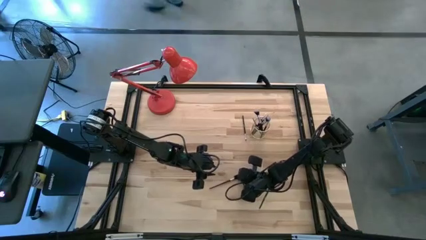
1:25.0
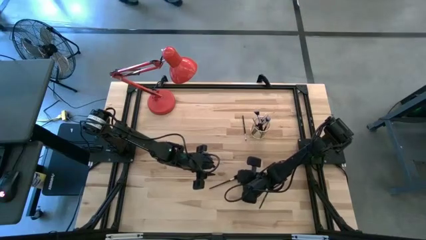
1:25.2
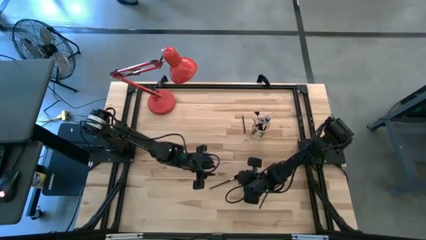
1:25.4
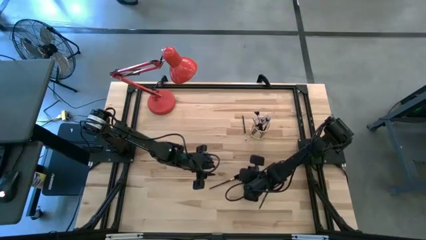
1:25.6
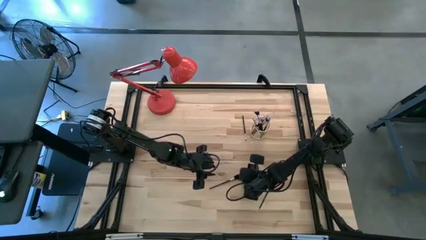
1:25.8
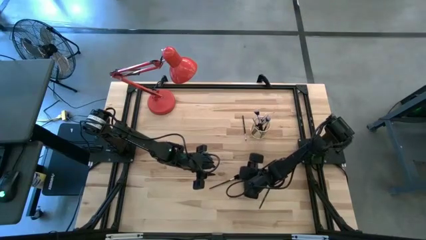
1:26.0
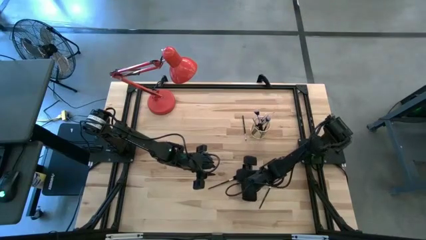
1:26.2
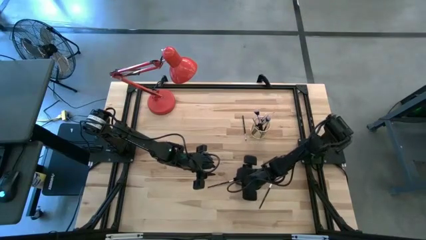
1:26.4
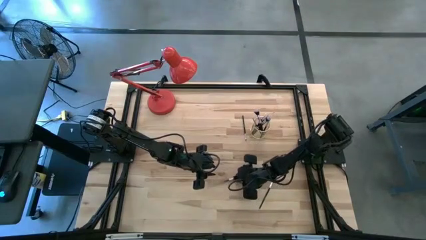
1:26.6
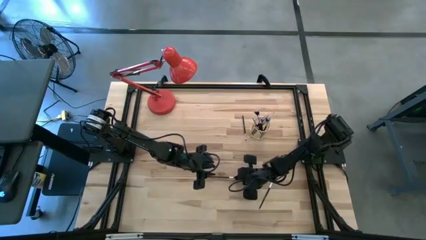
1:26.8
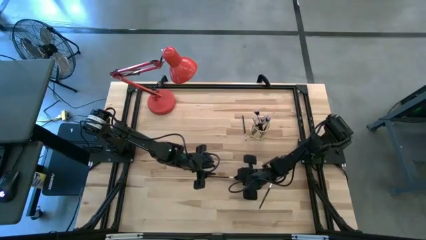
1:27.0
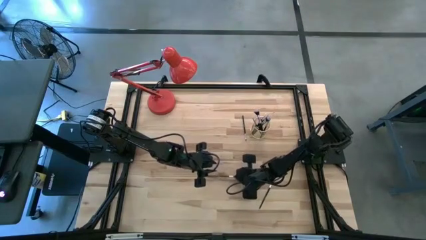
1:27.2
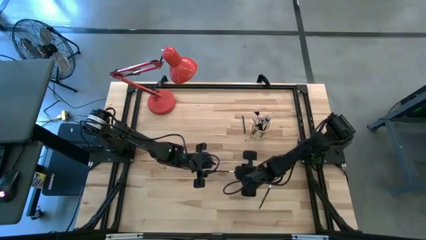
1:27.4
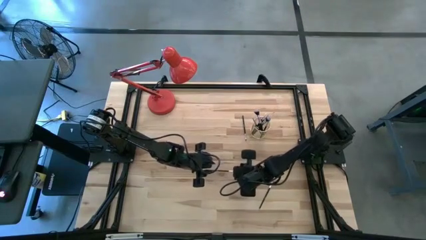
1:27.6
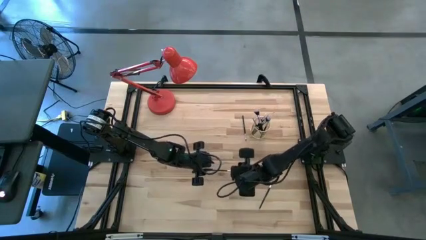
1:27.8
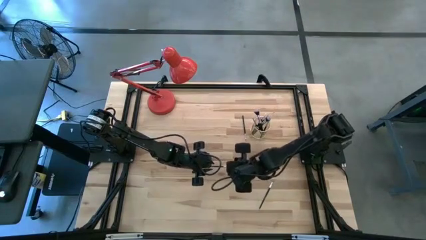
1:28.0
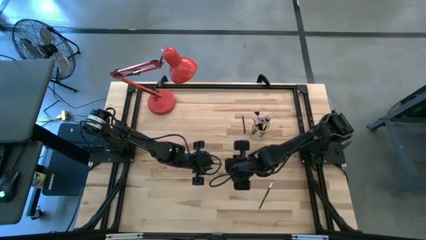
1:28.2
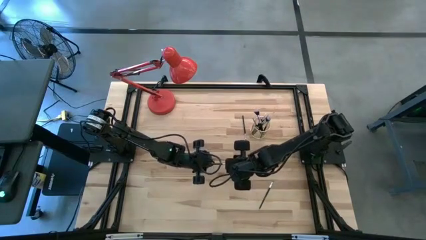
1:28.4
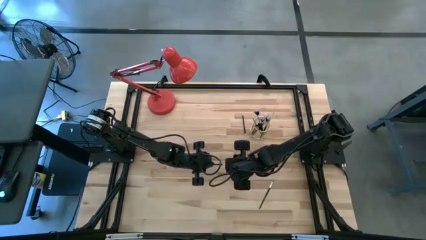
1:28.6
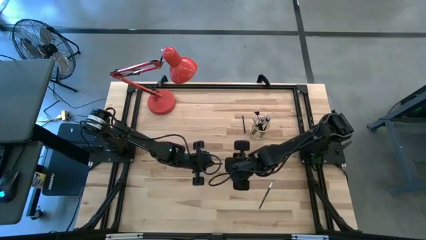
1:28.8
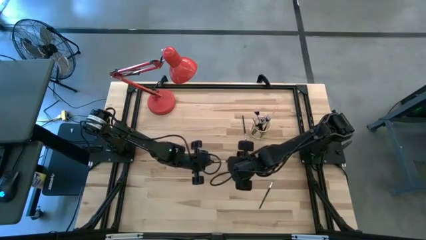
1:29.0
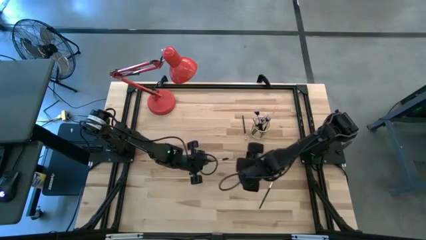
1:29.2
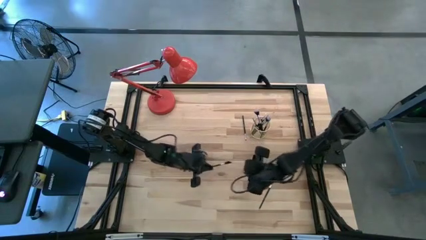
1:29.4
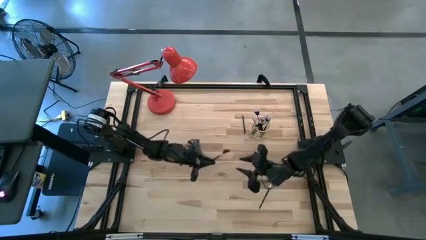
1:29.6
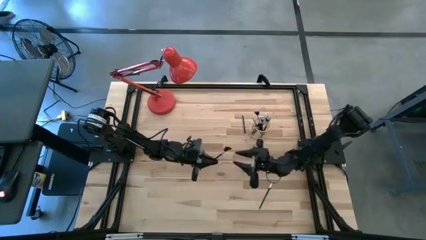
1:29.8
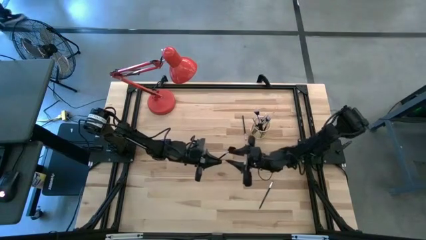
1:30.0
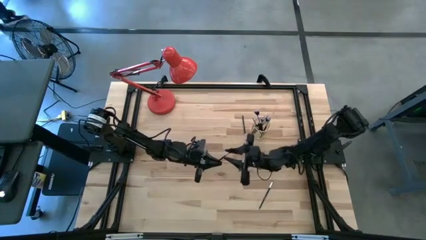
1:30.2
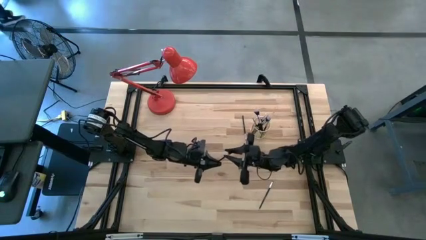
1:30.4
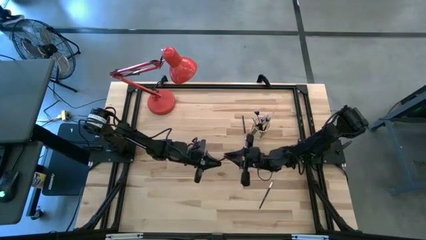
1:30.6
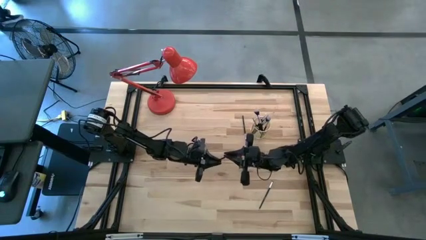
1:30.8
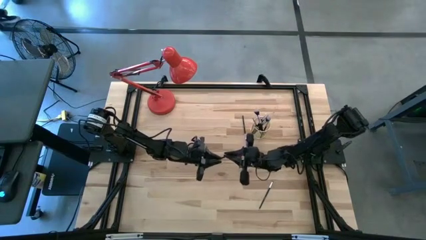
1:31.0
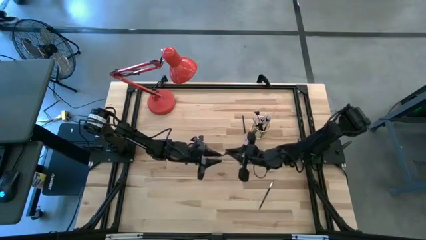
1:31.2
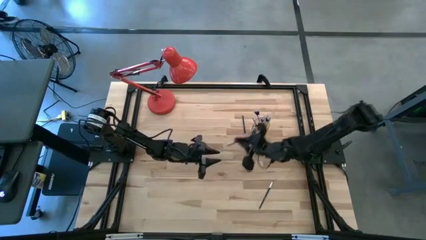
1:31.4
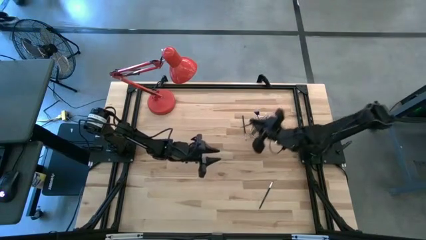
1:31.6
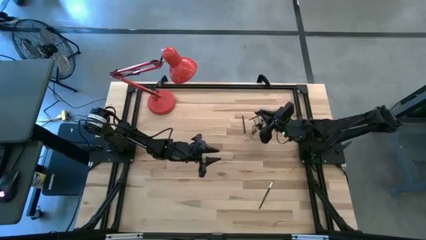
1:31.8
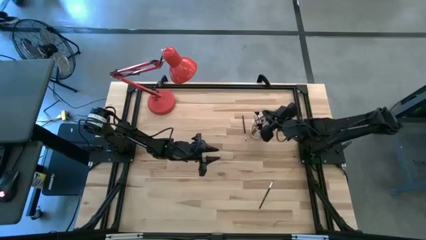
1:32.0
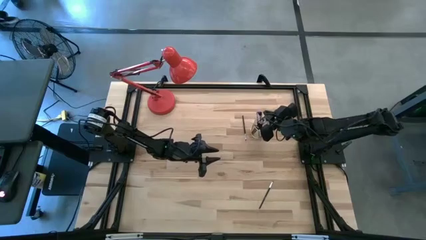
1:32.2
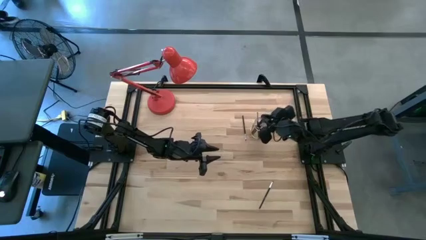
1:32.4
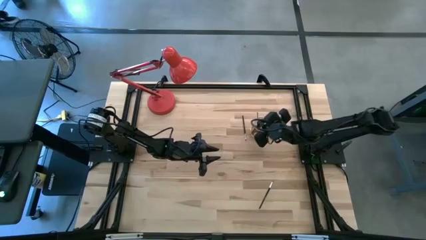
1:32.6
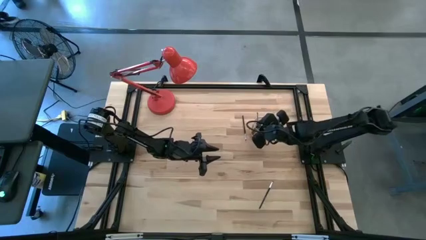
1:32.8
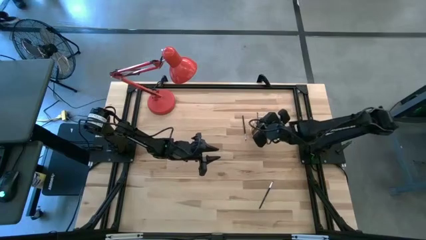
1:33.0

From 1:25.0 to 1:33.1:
Task: Put items in baskets/containers
Put the black brush into the gold holder

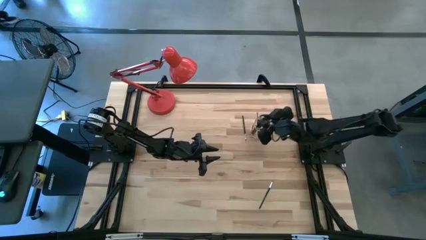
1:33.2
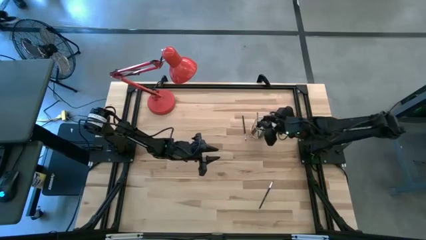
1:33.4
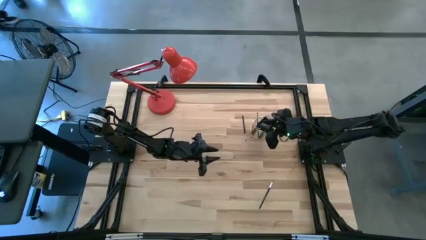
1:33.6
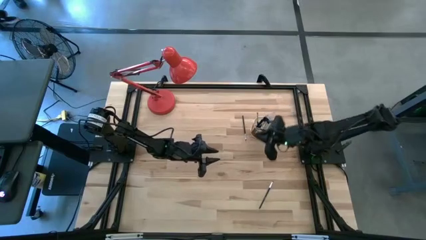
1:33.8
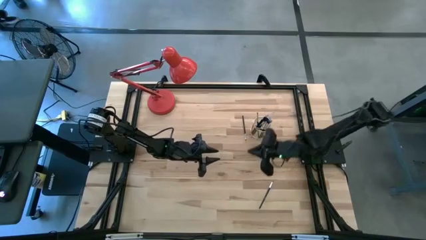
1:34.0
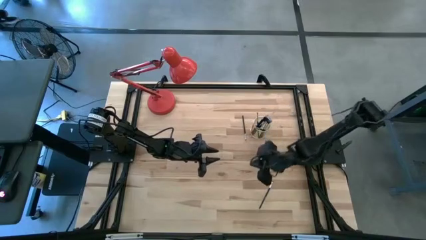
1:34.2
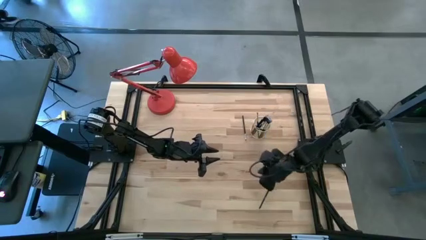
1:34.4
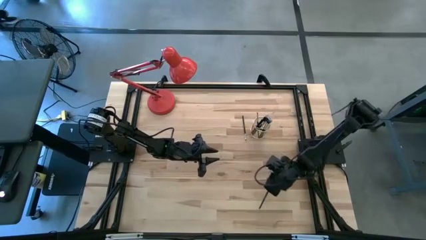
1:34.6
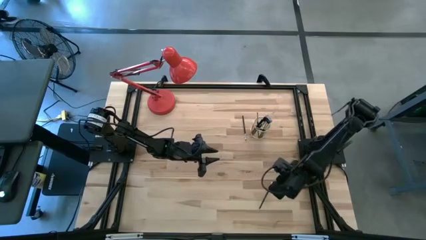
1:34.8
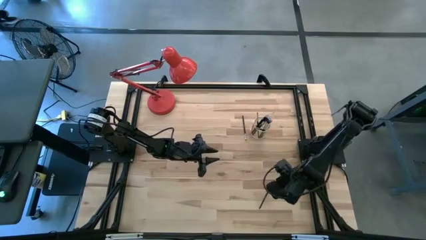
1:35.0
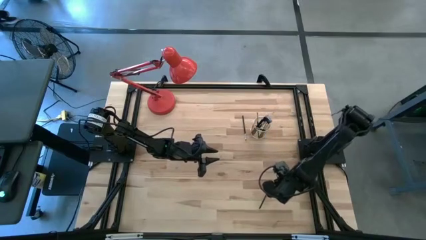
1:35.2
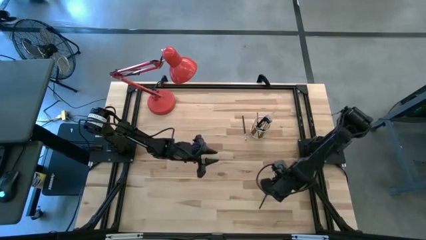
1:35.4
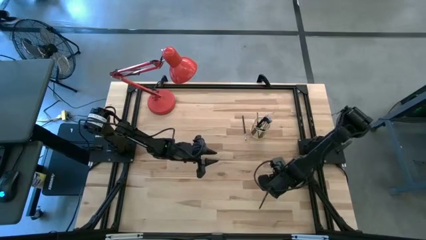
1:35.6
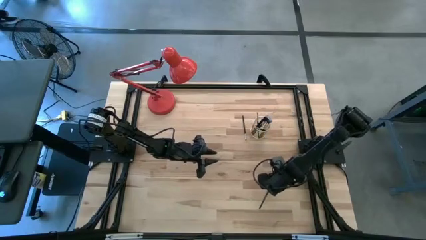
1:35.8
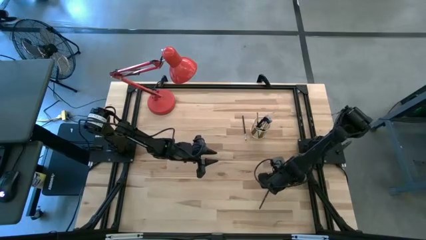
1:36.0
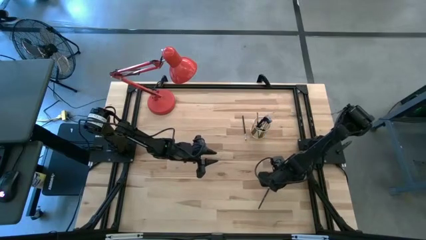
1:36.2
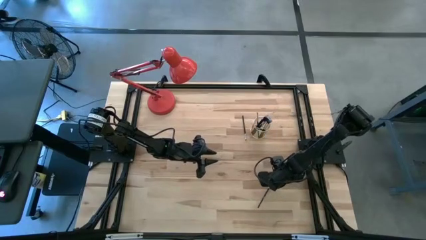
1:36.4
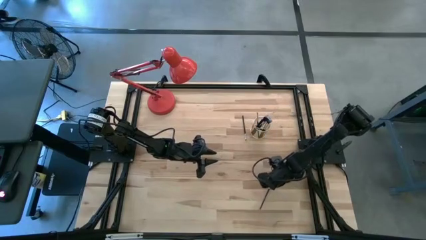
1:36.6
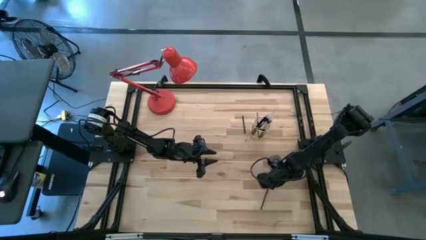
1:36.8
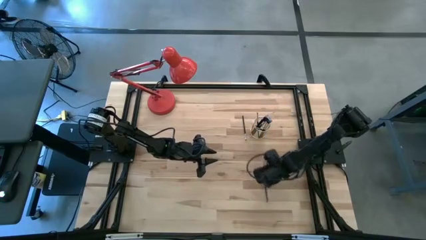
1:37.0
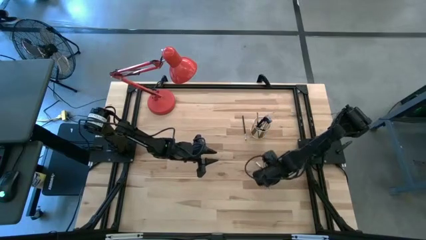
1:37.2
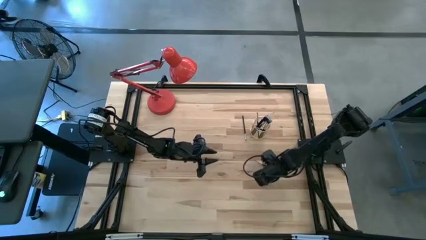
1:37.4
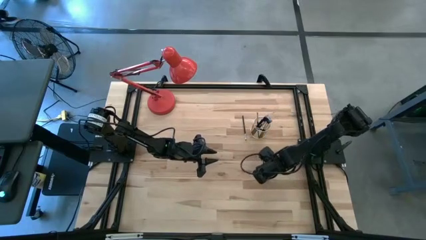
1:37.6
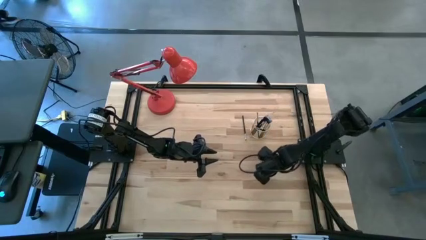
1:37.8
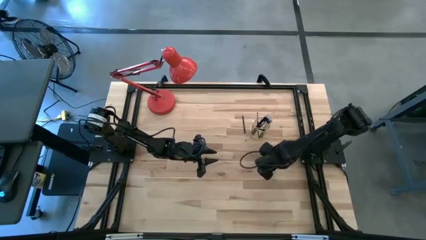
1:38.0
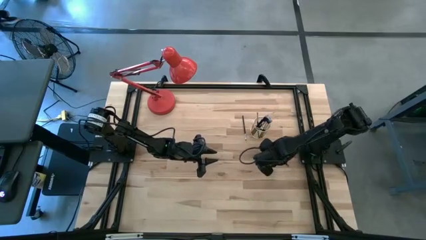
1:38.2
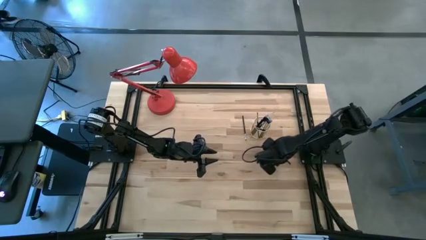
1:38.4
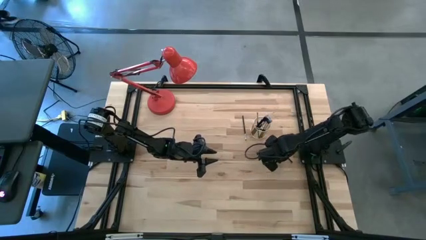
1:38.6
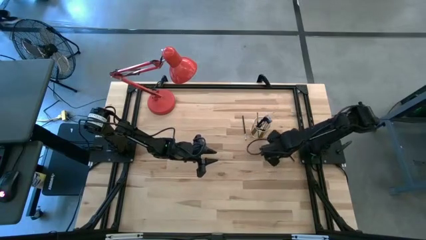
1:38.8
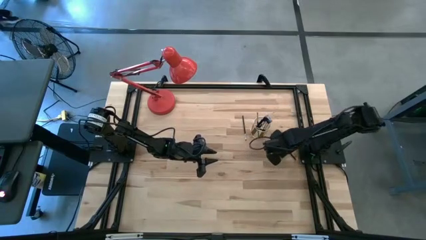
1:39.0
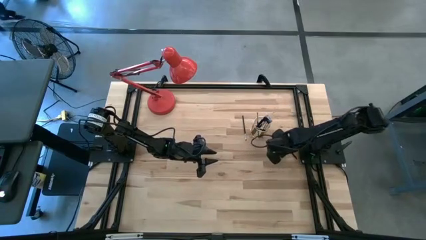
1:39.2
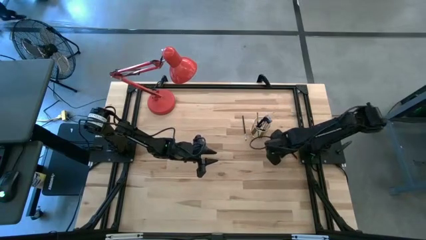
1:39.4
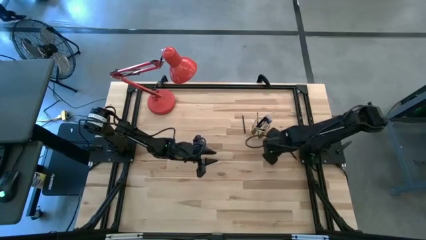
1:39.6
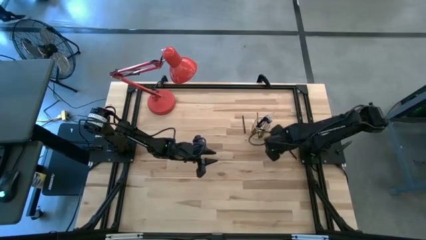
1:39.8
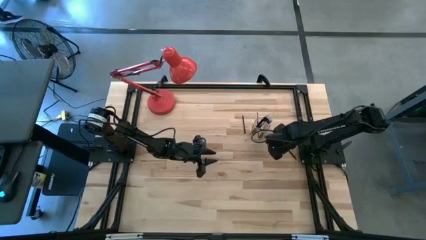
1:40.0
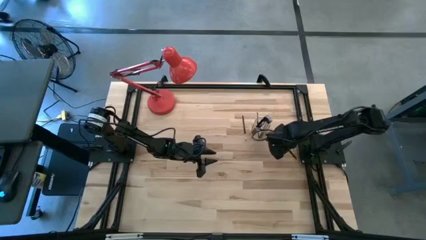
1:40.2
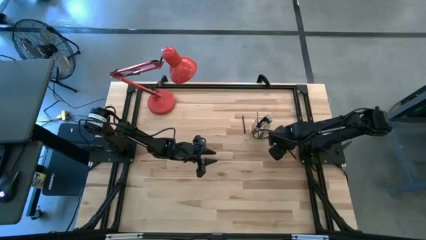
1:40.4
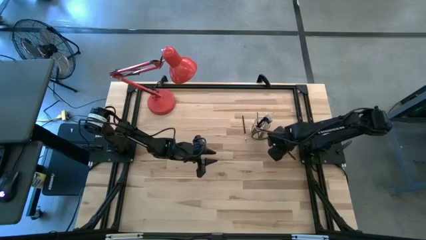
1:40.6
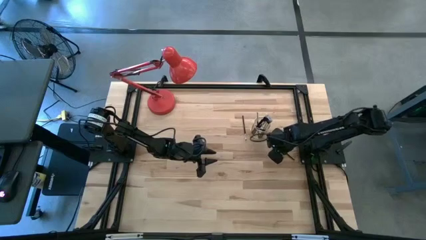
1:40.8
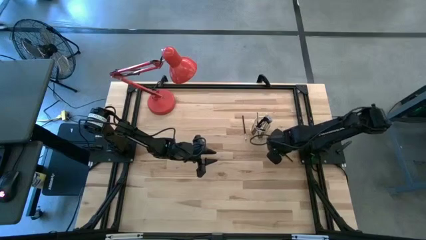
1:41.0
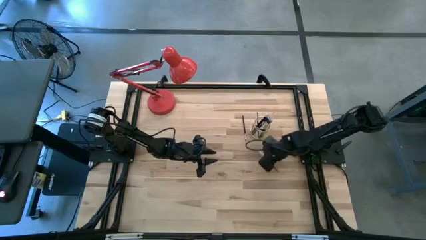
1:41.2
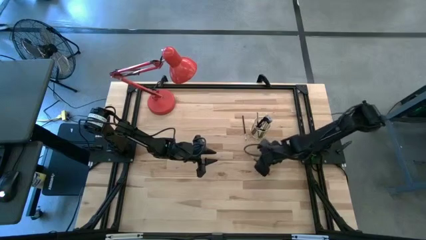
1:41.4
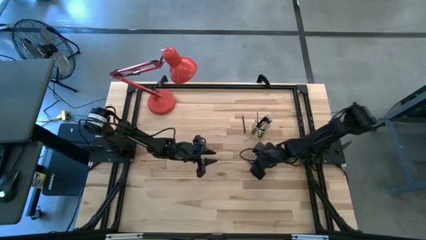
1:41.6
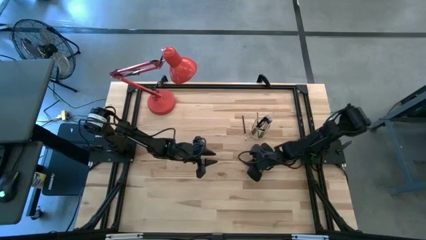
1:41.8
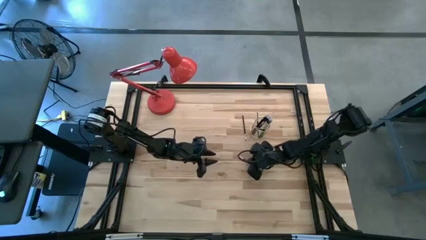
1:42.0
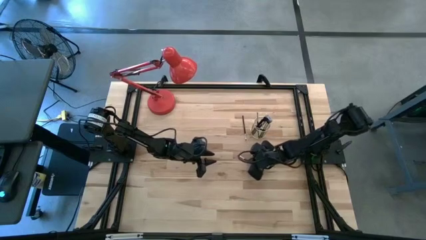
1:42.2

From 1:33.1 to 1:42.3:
Put the black brush into the gold holder
